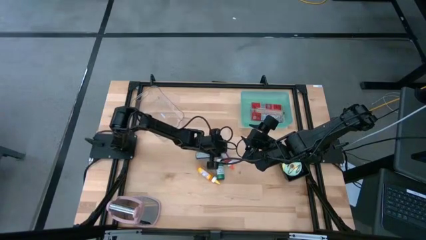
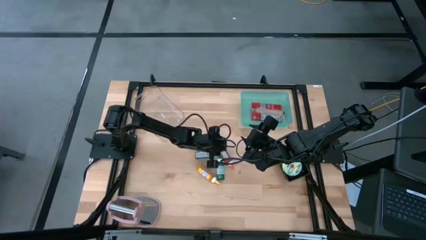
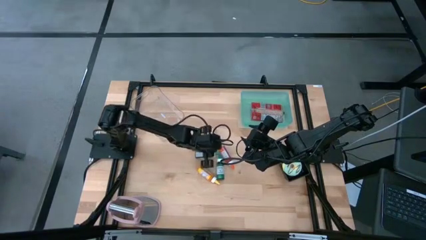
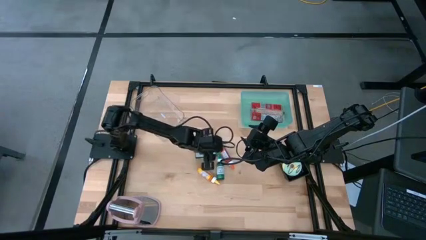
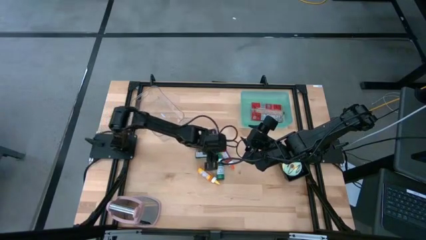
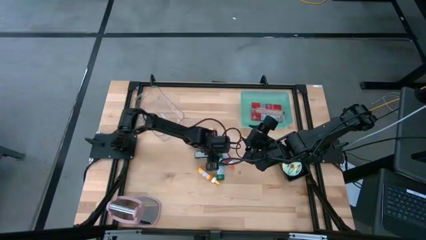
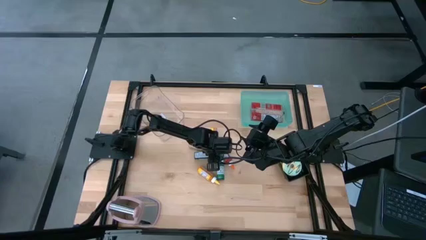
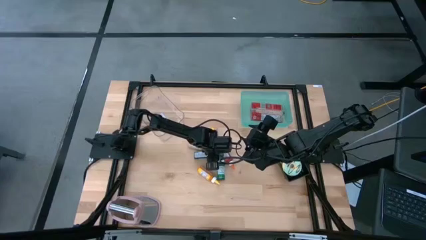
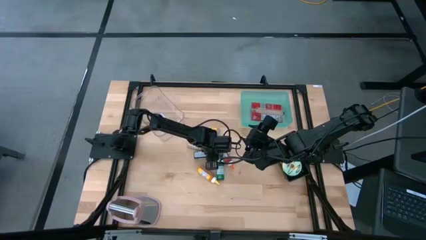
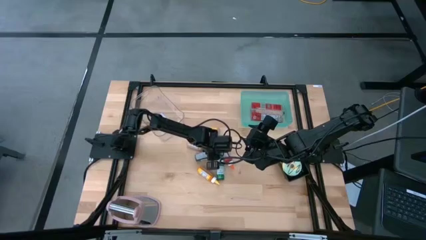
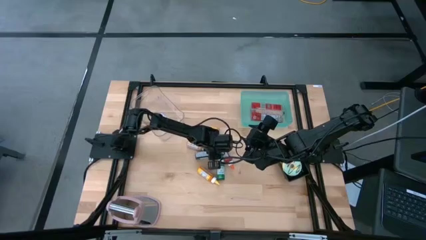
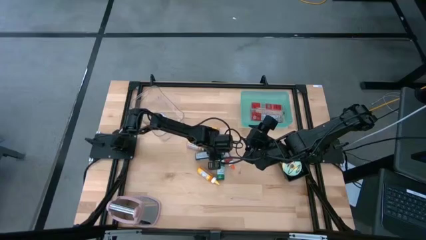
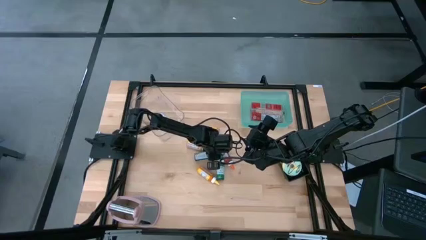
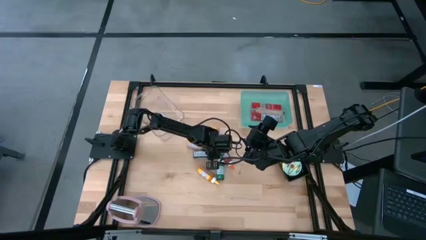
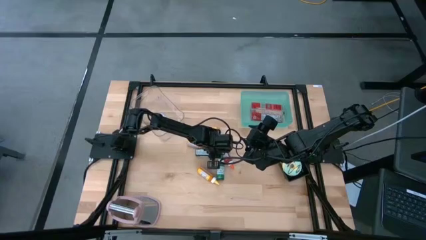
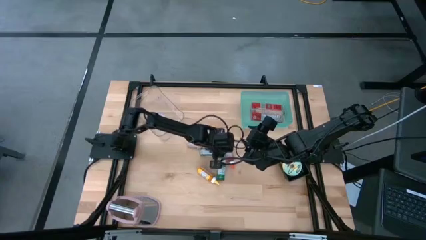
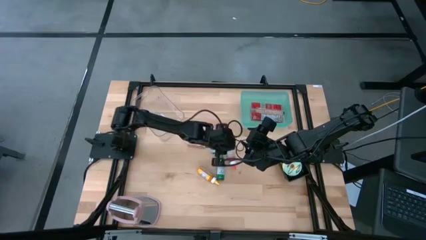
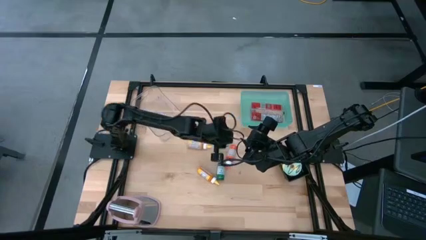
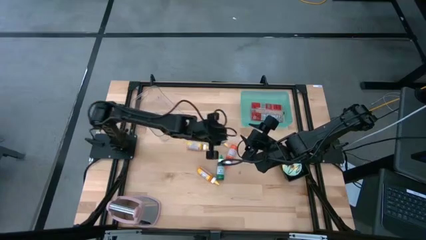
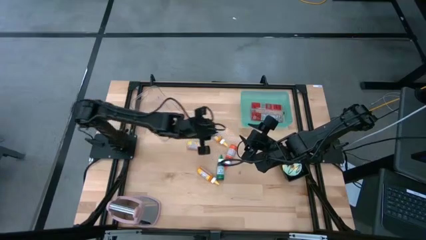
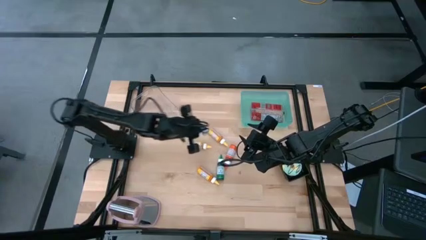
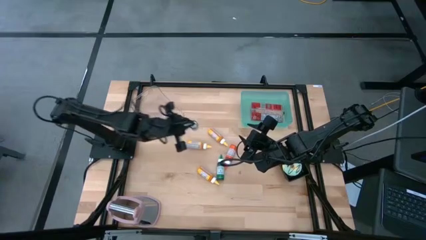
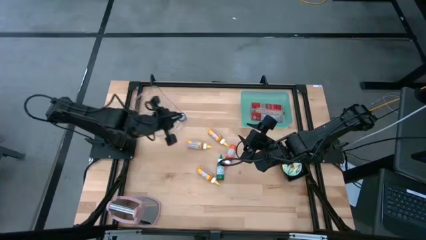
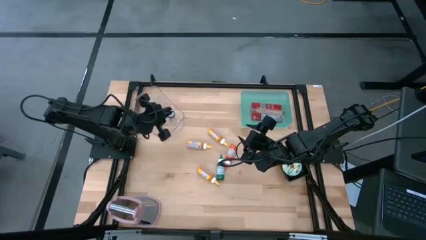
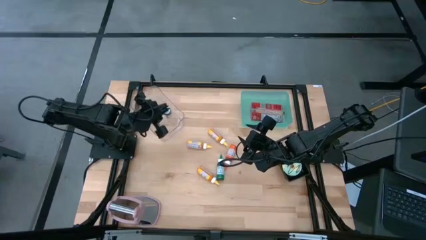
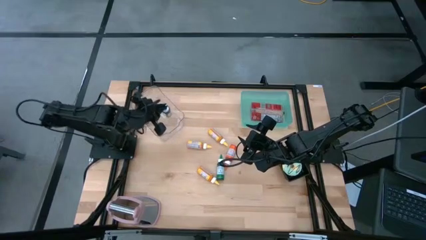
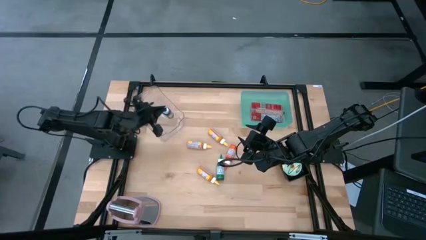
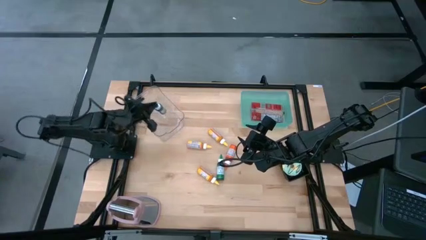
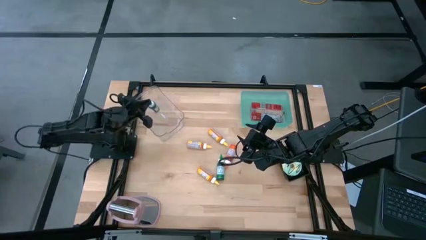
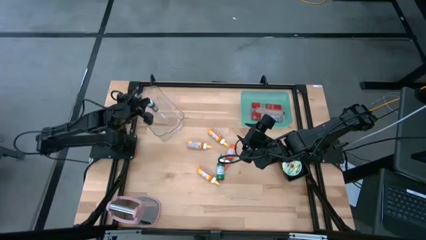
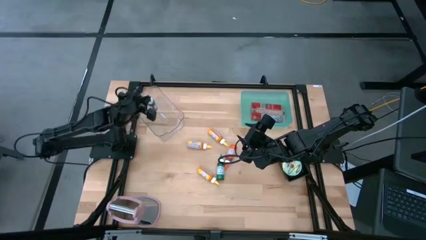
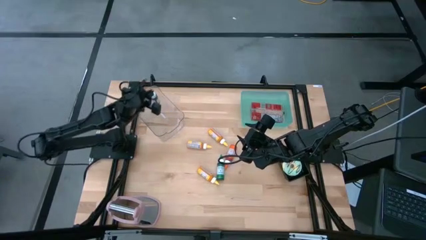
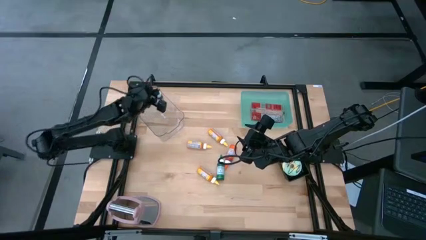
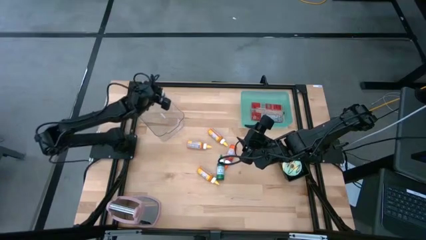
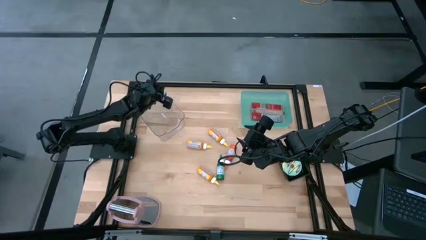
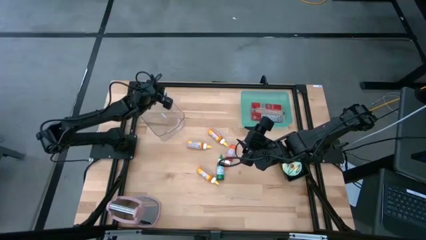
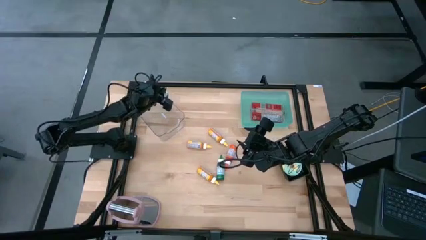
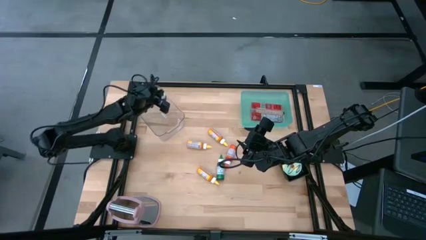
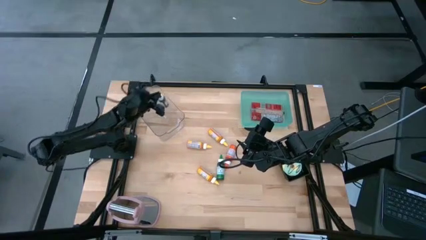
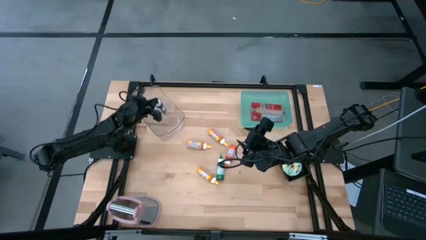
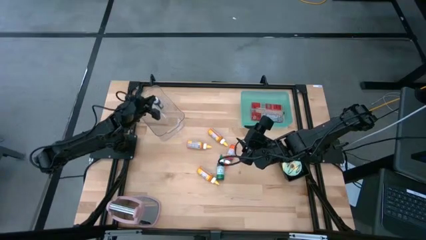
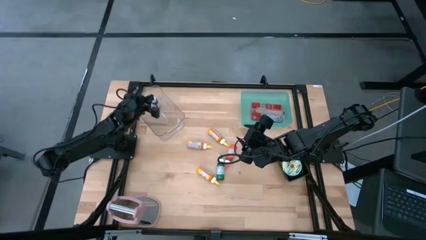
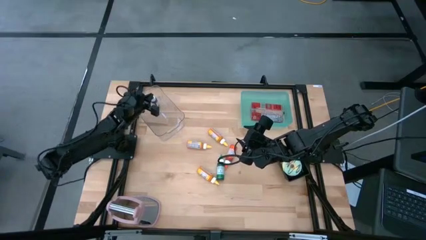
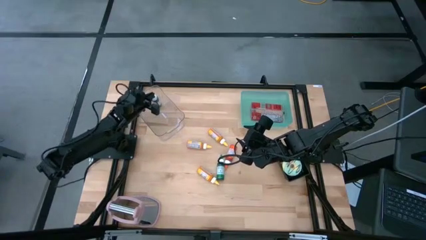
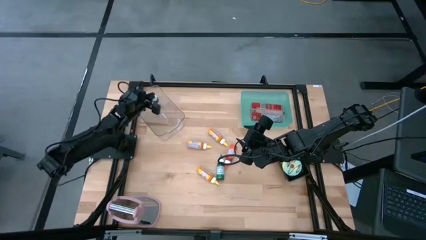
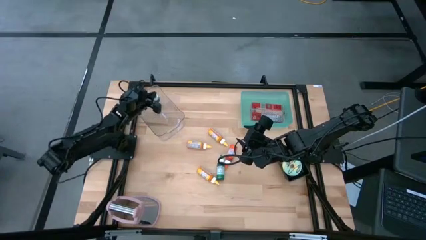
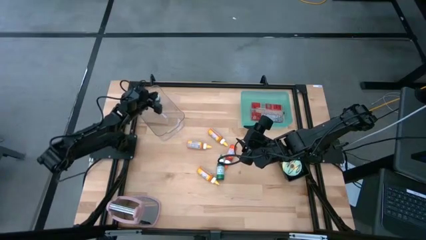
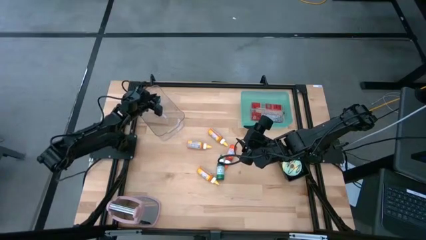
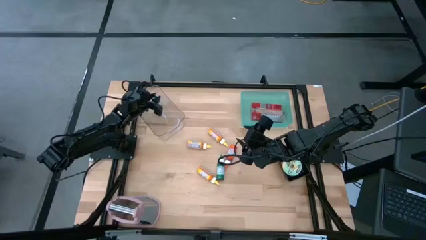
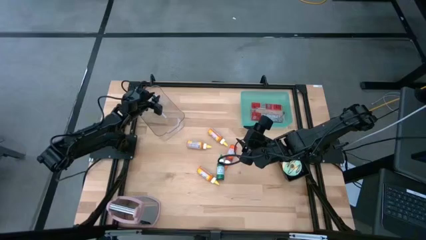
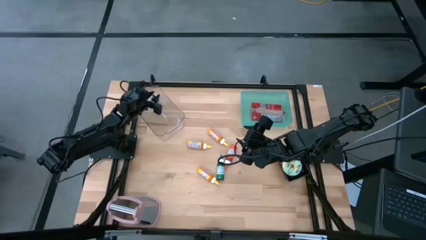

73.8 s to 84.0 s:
Put the left green food coloring bottle into the transparent bin

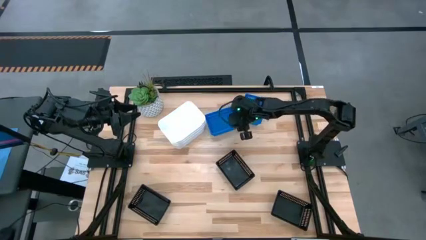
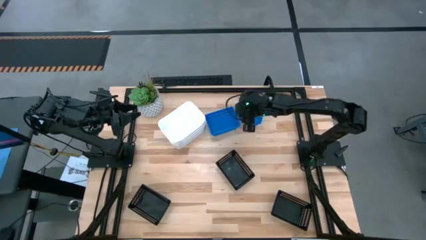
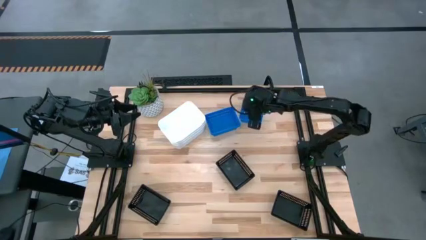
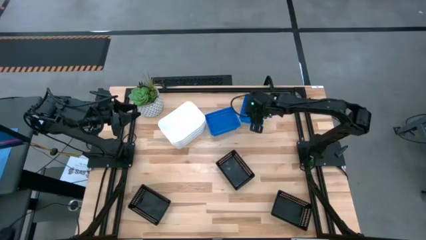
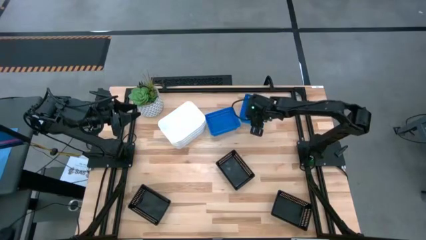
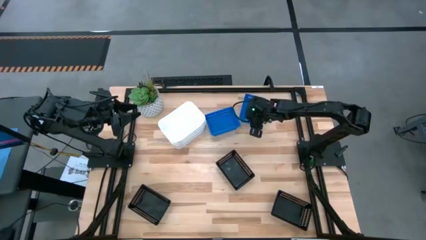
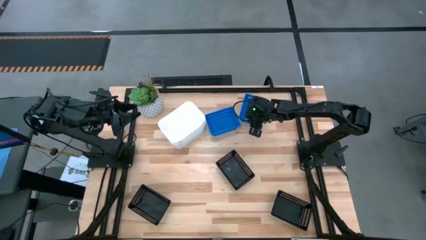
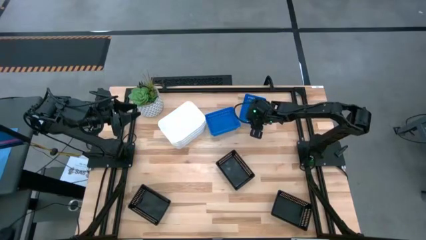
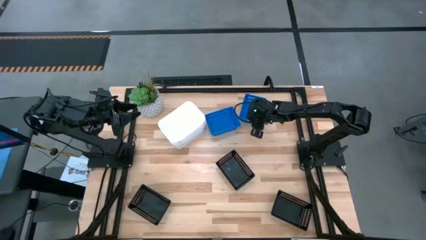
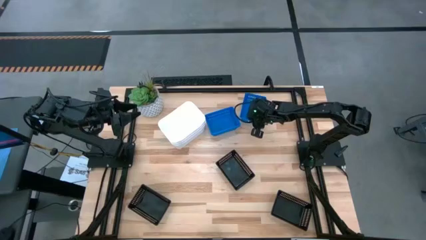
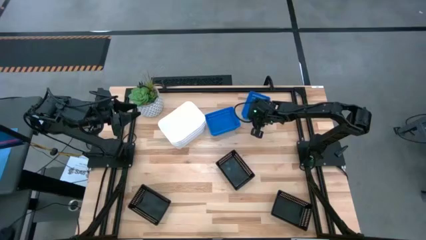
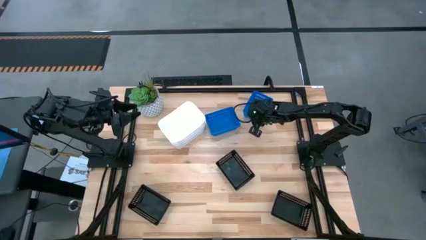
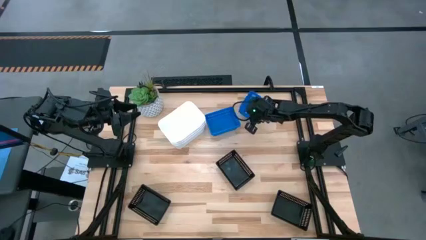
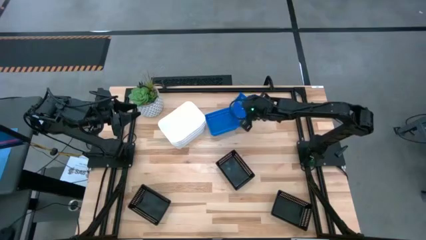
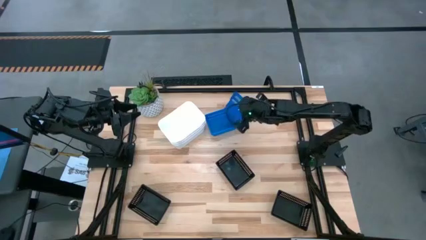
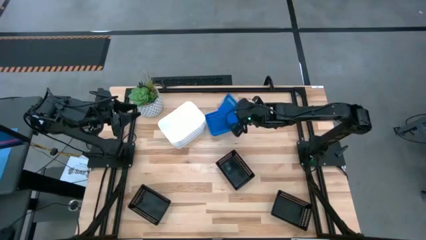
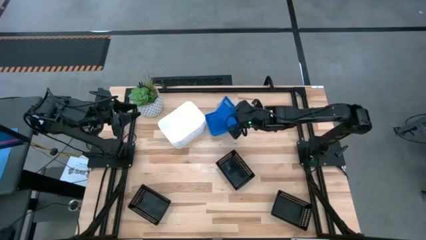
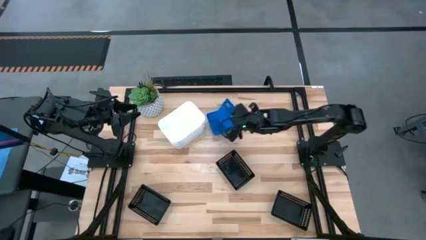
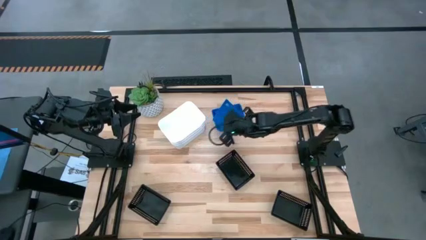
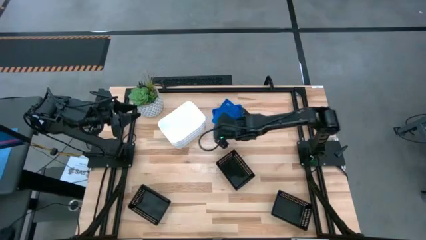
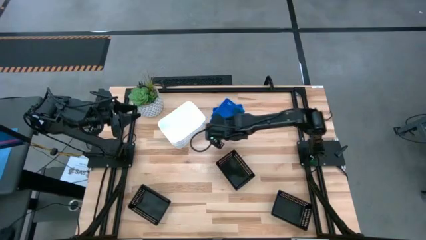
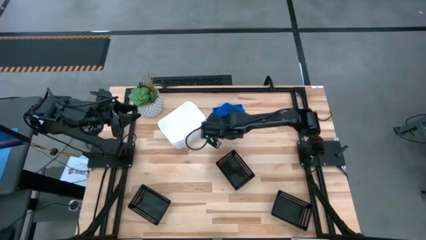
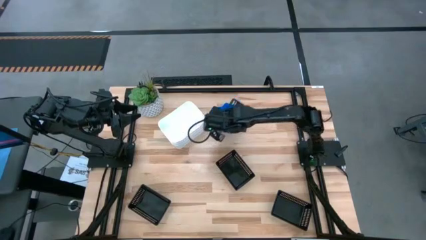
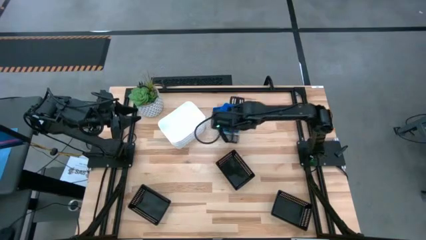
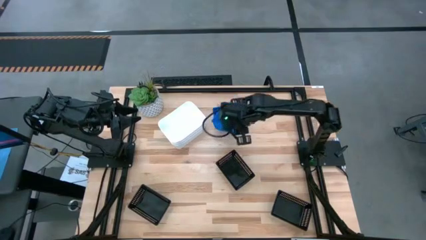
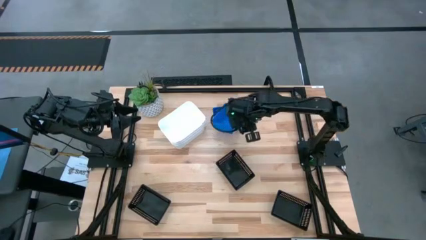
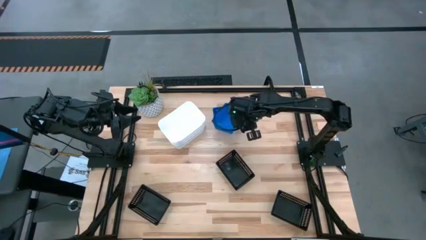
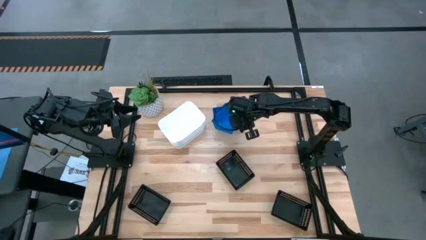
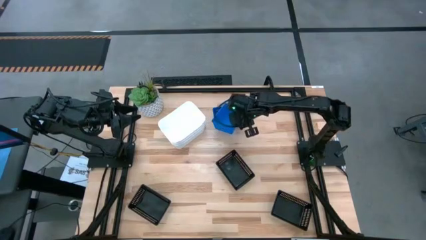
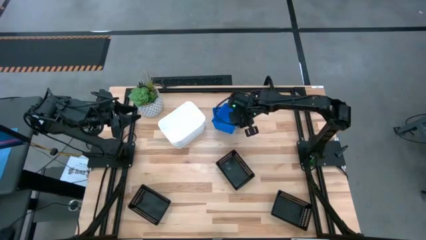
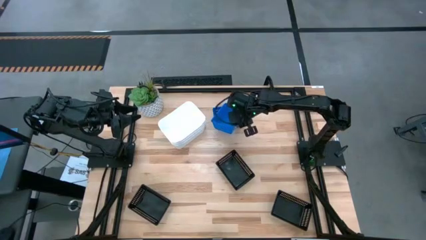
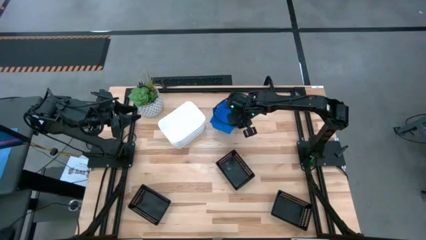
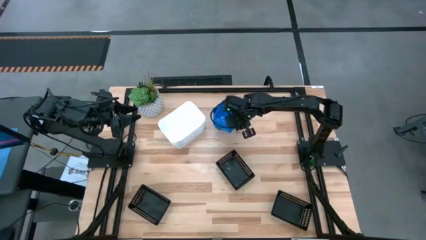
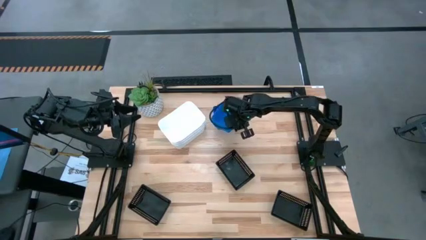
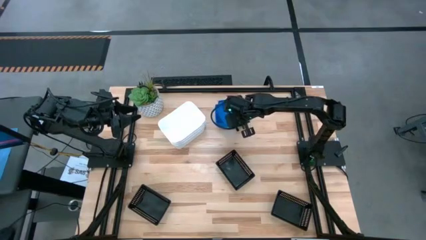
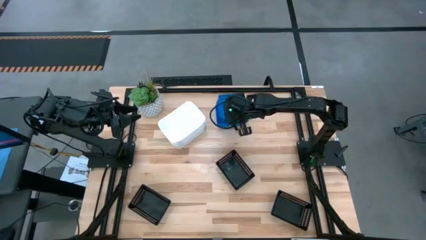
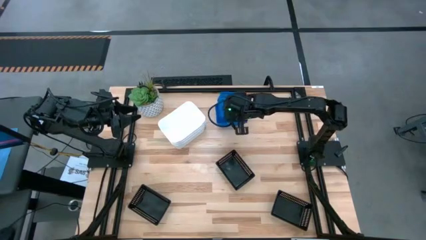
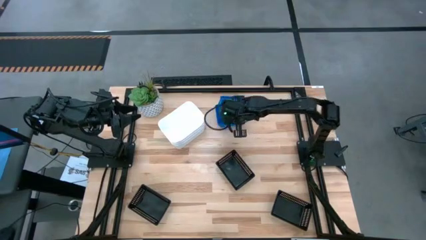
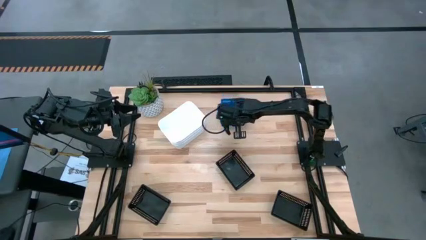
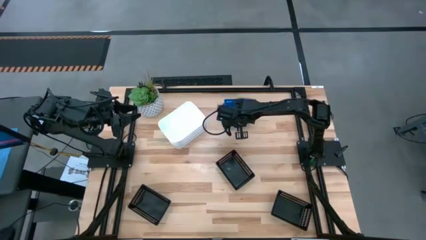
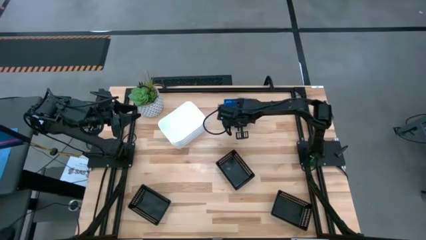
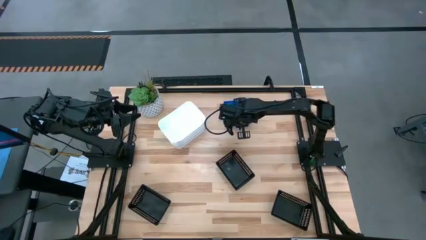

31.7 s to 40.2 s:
Stack the right blue bin on the blue bins
